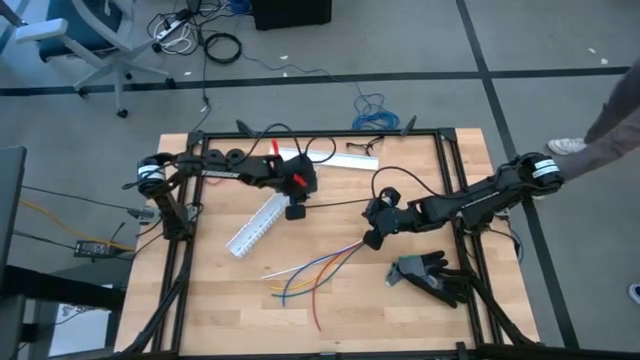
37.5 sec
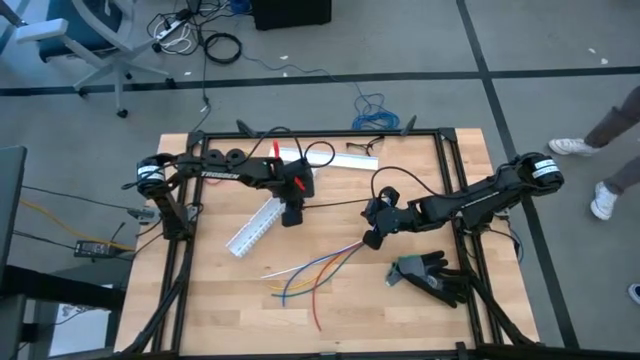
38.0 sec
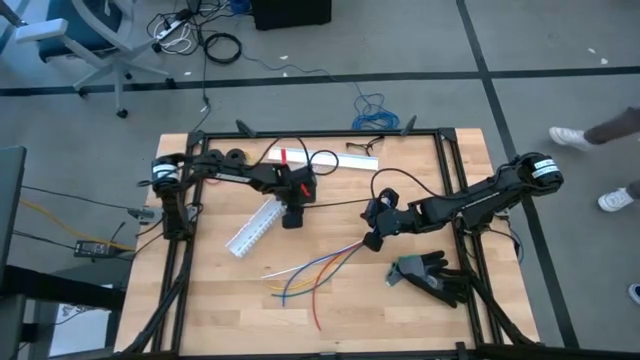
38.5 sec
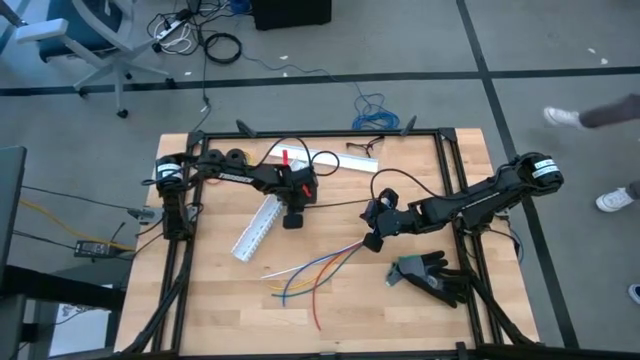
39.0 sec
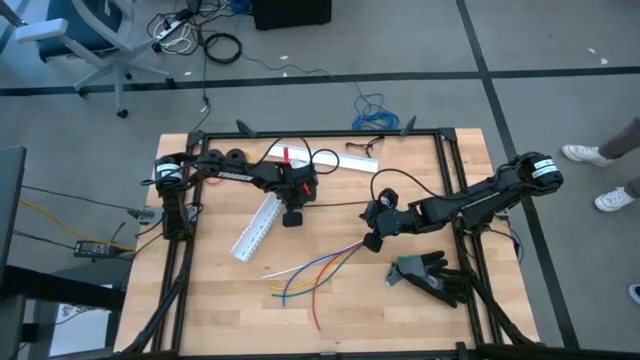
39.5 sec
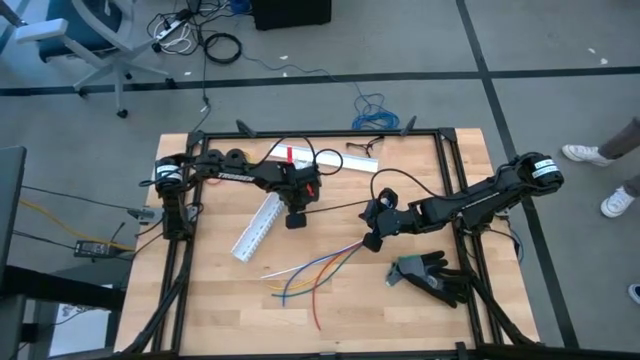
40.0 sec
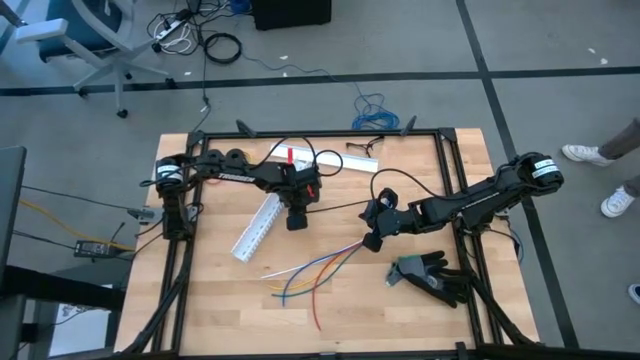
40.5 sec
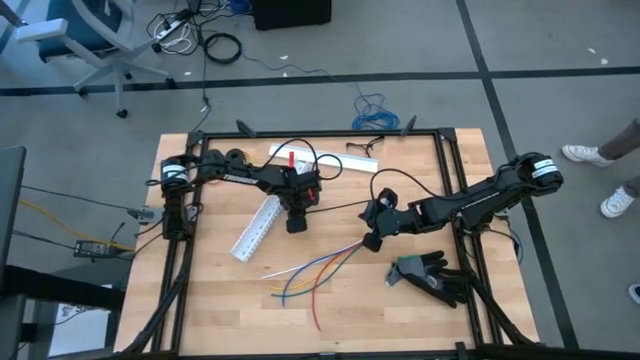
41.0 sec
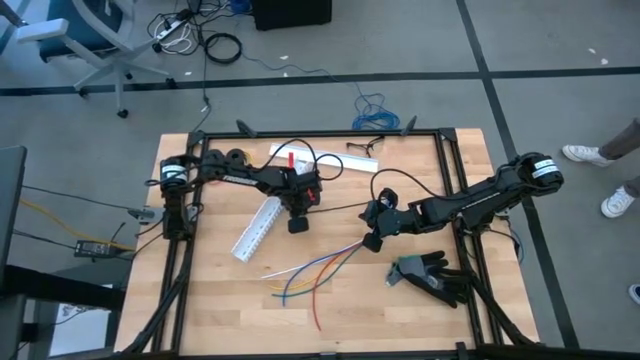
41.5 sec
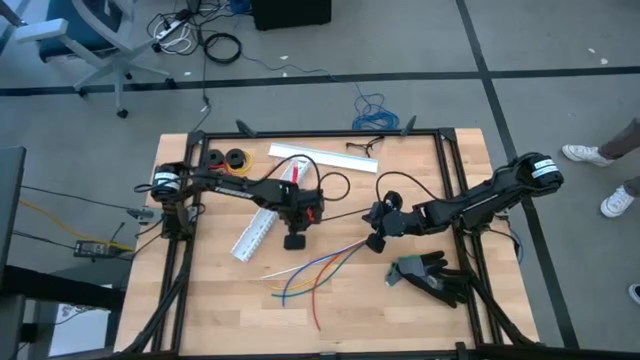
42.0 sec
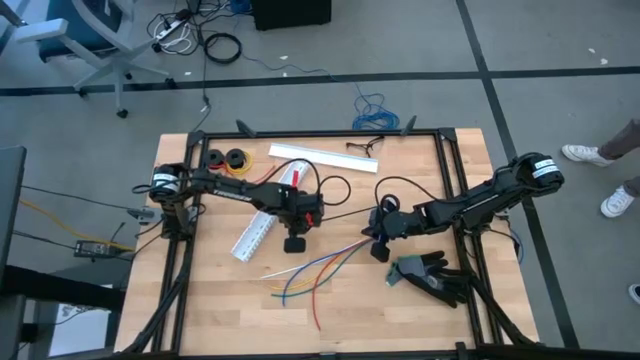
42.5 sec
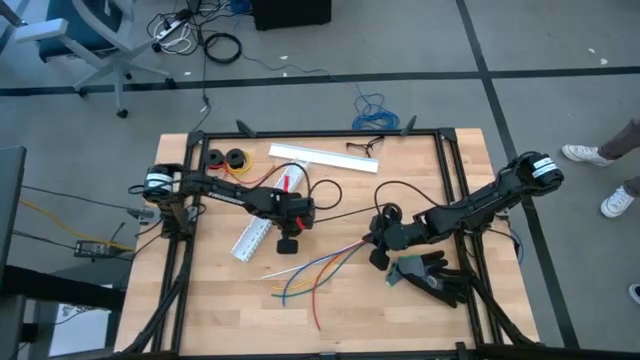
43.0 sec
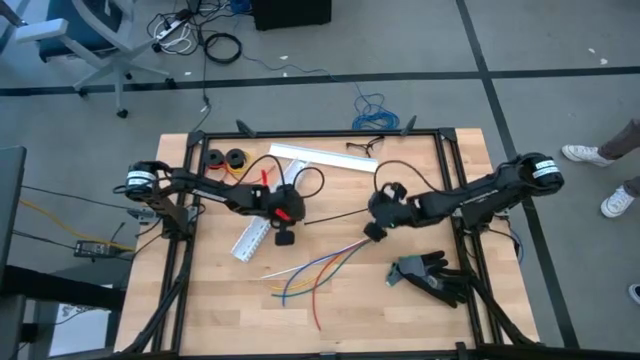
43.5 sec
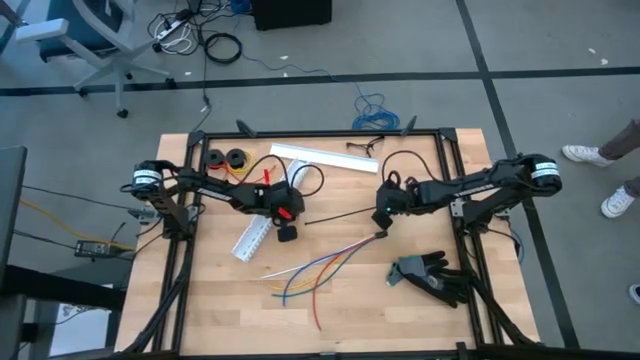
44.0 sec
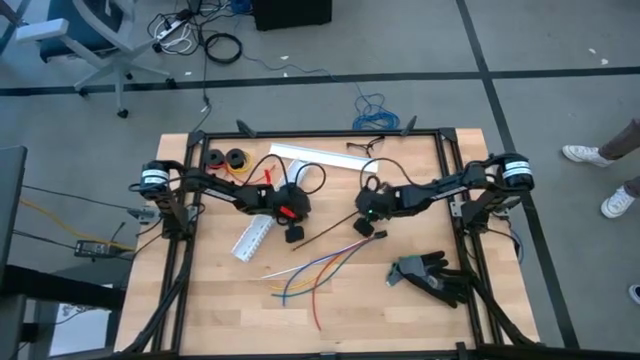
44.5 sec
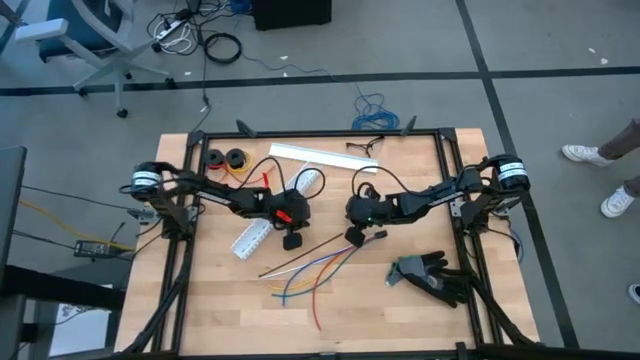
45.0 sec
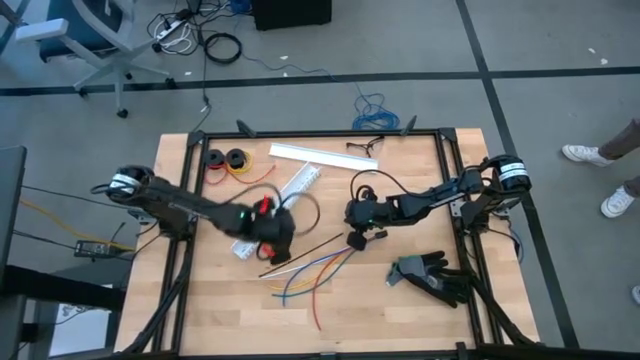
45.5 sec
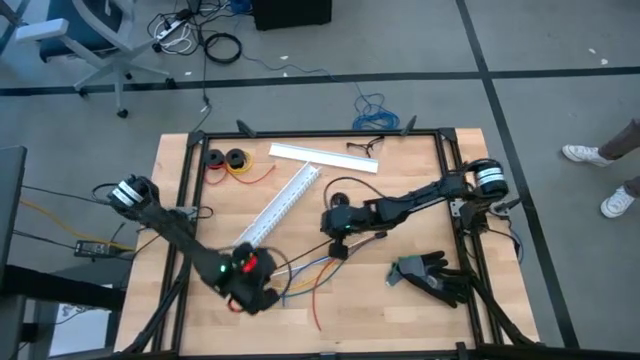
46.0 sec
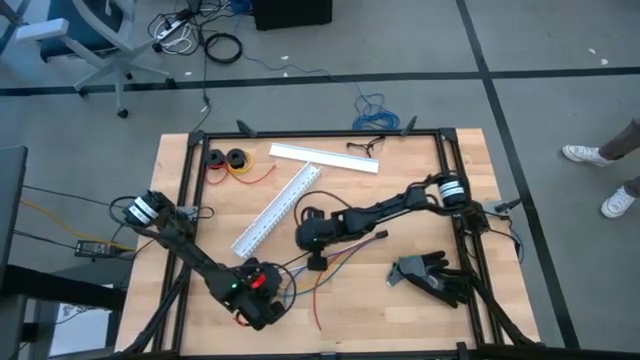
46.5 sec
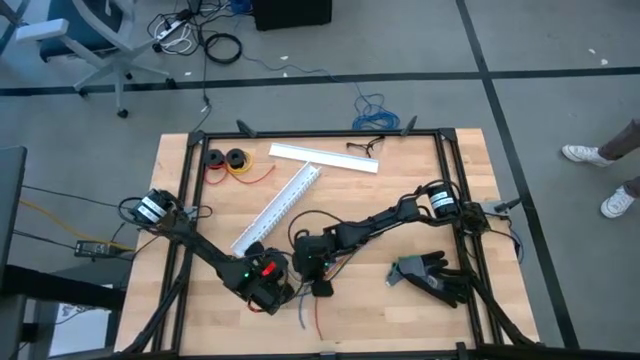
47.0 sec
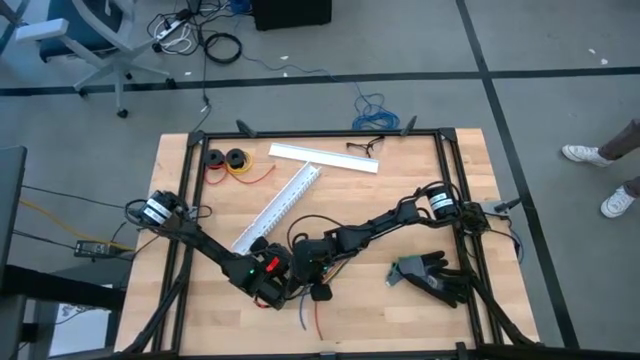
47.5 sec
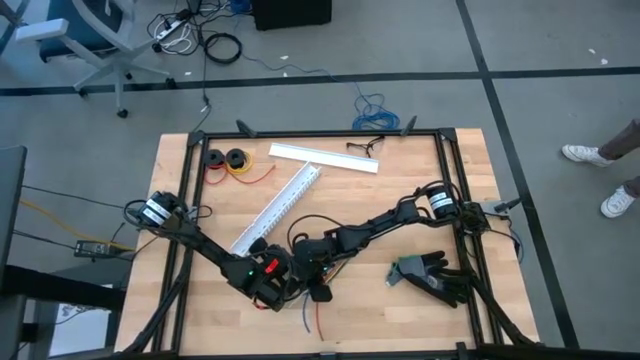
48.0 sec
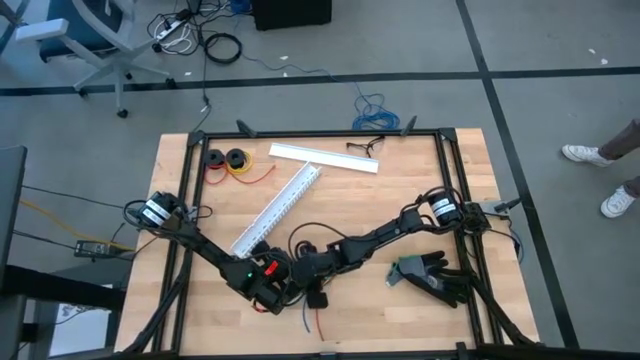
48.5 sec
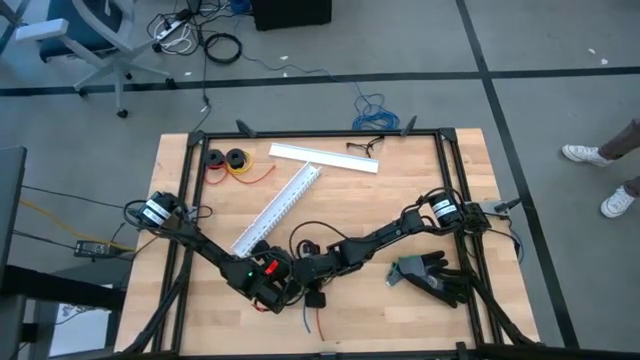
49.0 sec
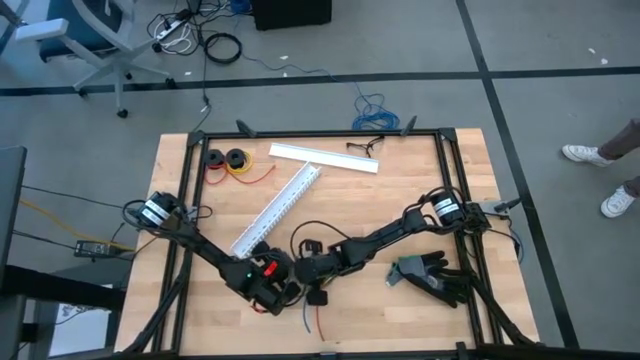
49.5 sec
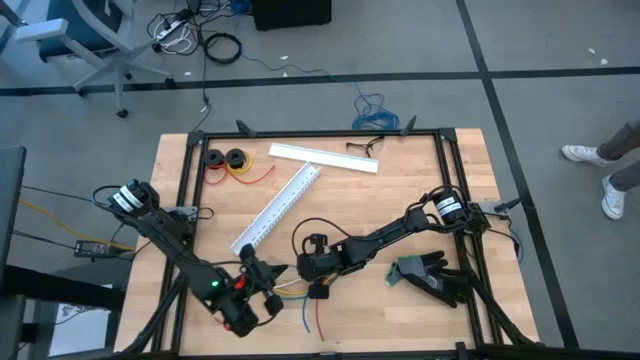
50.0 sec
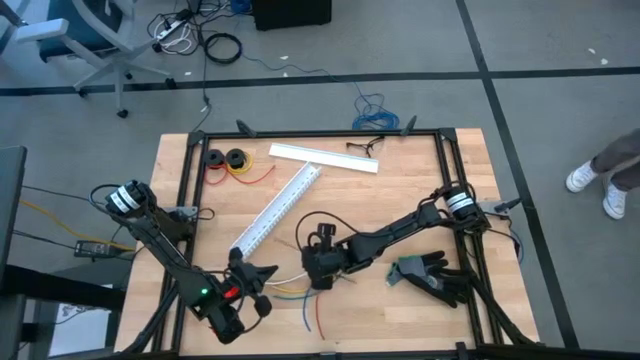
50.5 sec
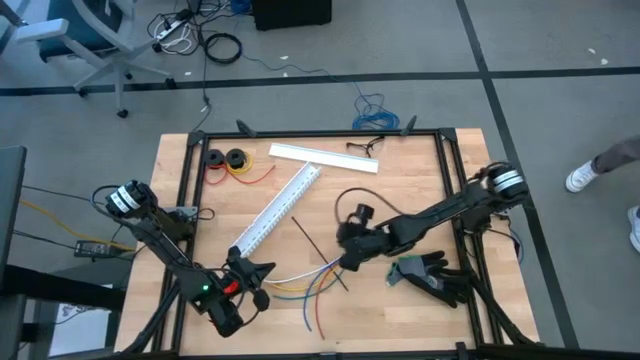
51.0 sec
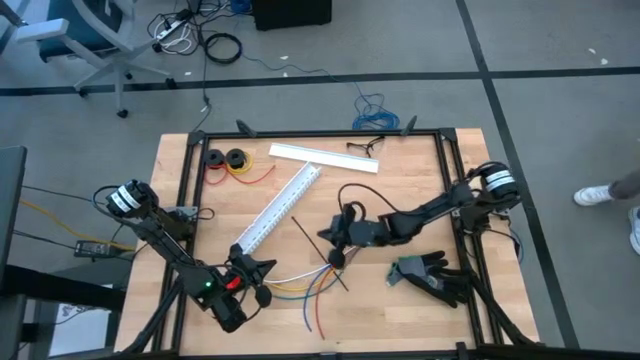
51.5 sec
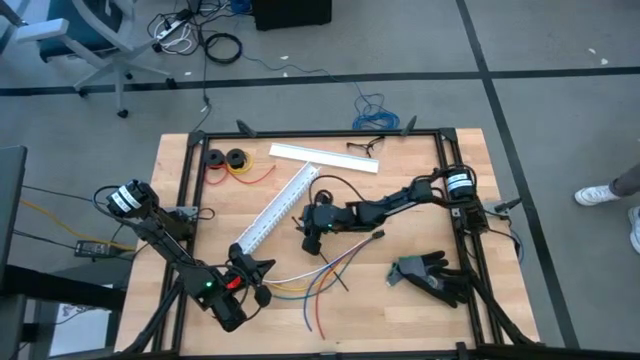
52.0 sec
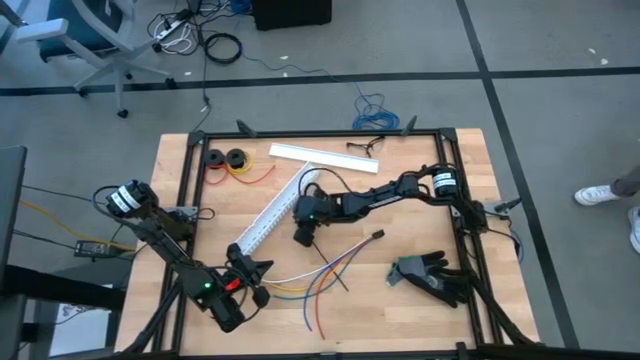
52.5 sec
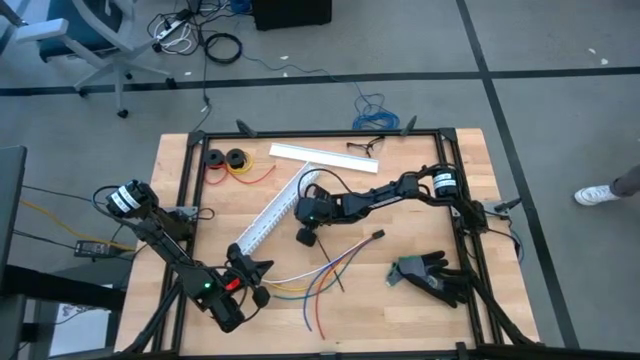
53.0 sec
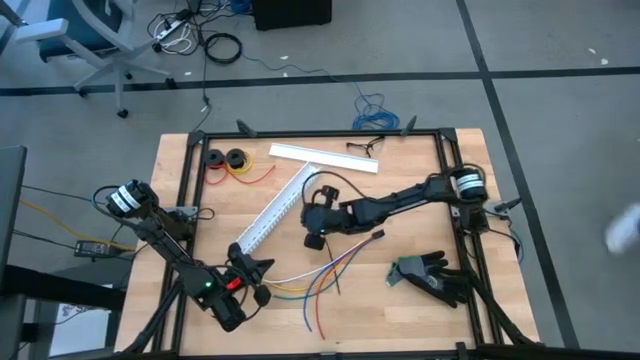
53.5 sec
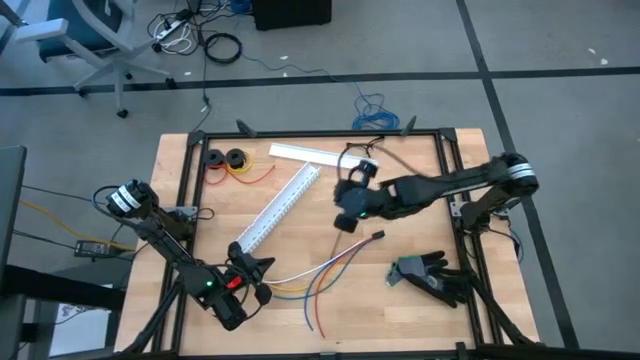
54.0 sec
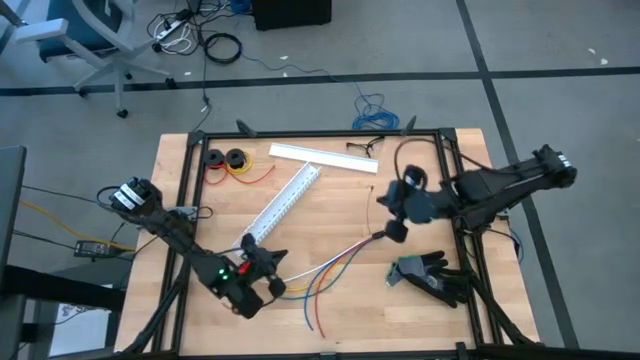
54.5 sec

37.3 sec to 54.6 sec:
Task: Ziptie cables
Wrap the black zip tie on the cables

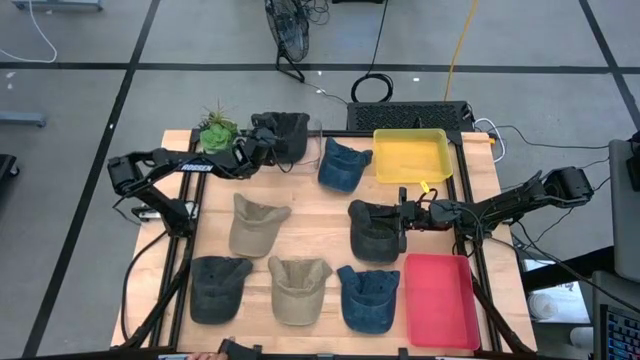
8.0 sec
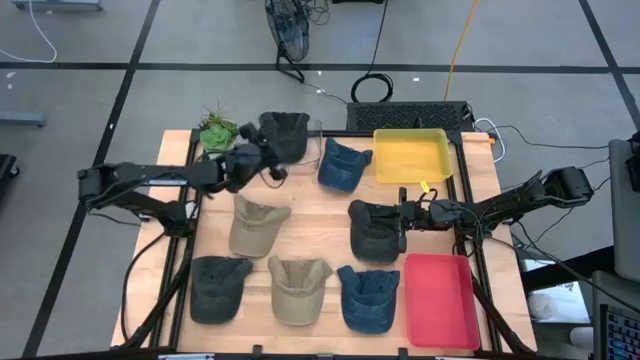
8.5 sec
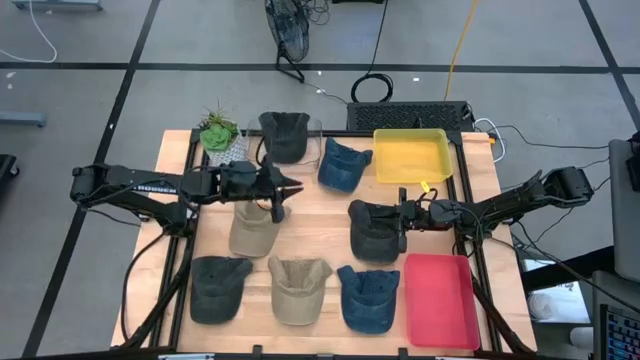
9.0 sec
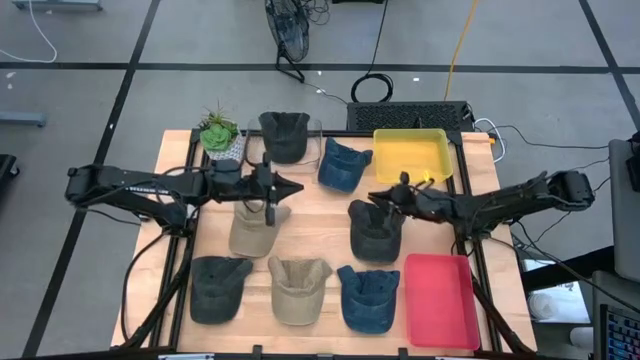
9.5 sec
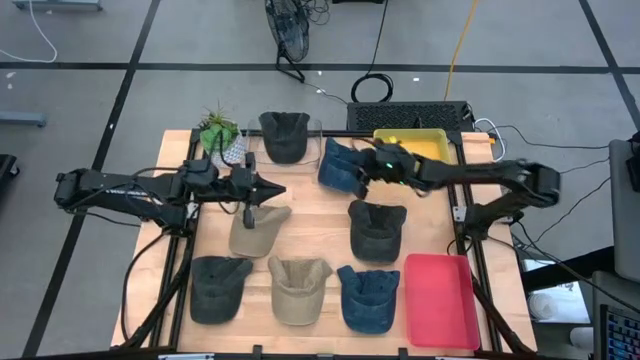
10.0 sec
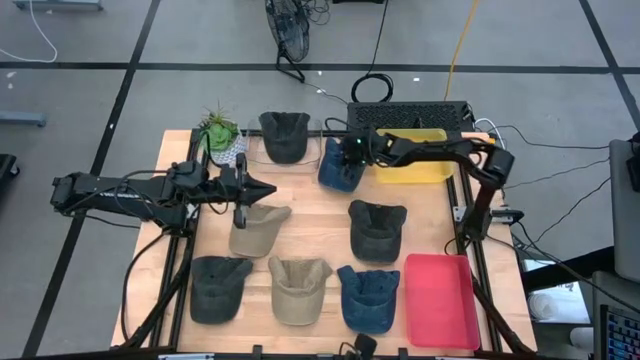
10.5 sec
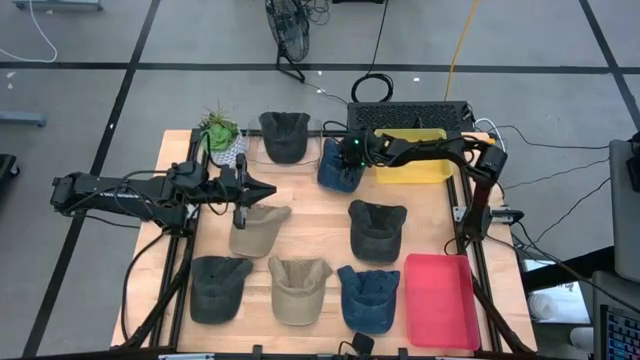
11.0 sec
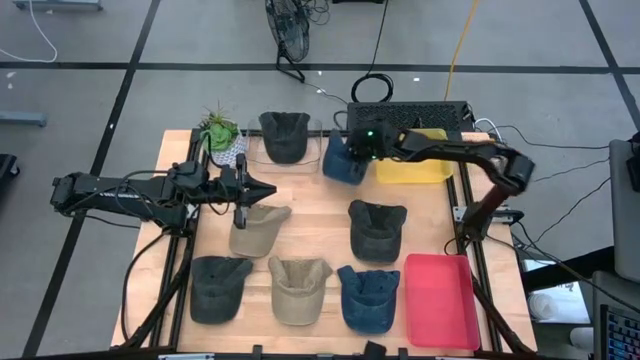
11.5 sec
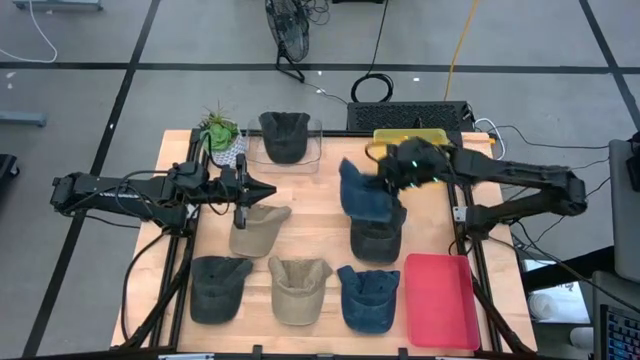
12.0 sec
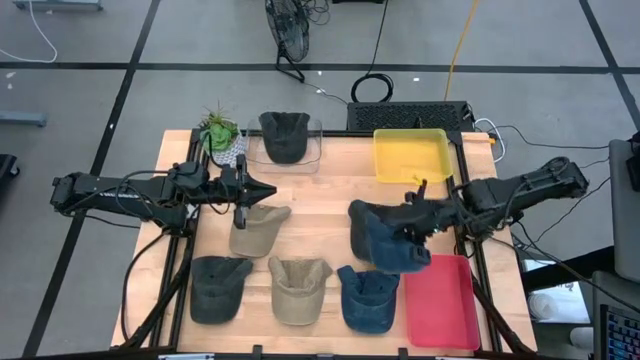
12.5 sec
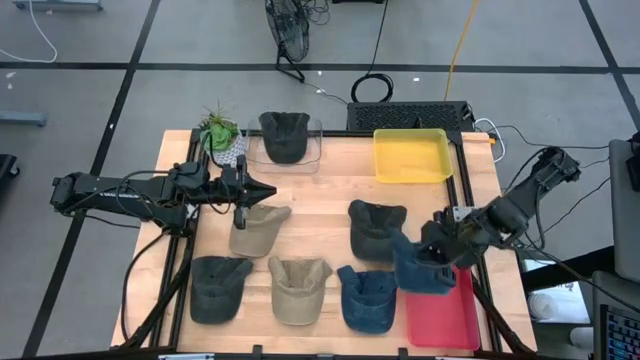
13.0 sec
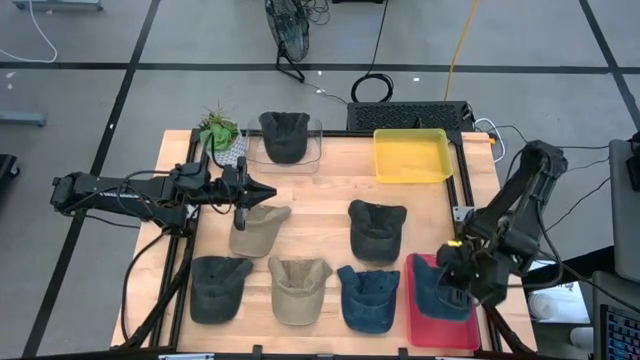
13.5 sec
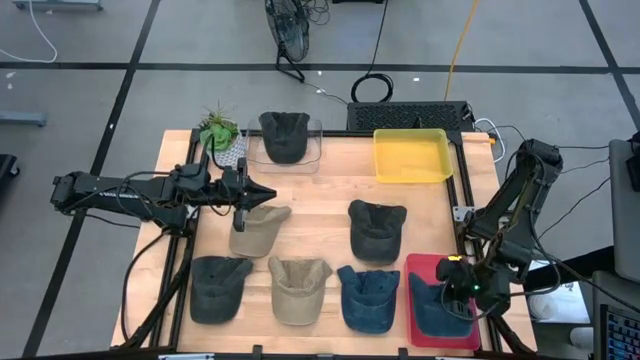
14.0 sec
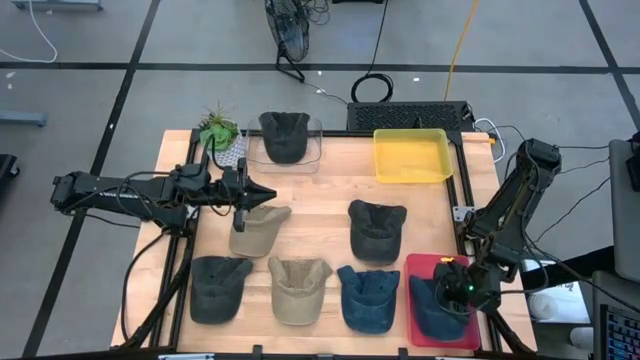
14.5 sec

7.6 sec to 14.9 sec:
Task: Pick & Place hat
Put the top blue cap into the pink bin
